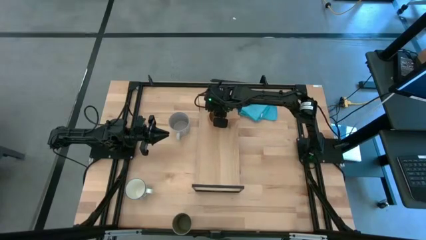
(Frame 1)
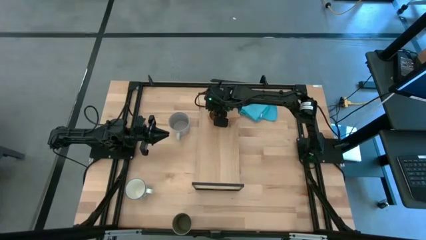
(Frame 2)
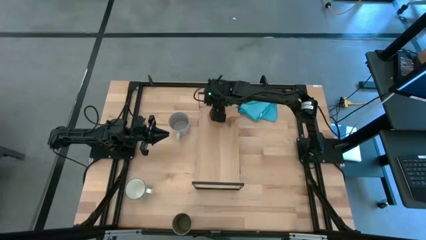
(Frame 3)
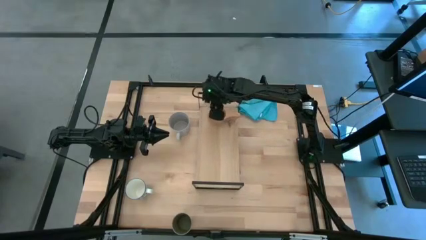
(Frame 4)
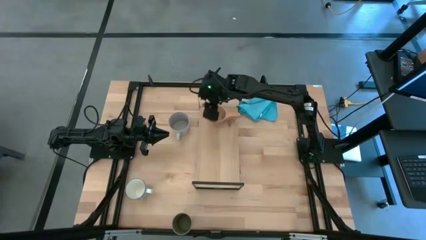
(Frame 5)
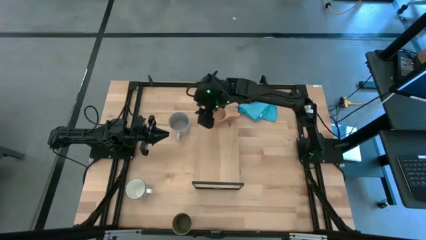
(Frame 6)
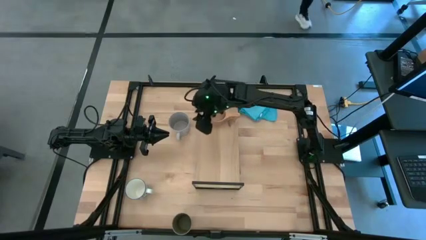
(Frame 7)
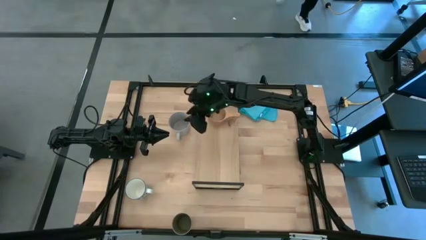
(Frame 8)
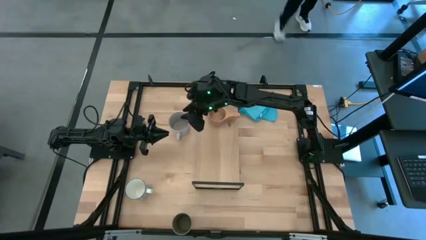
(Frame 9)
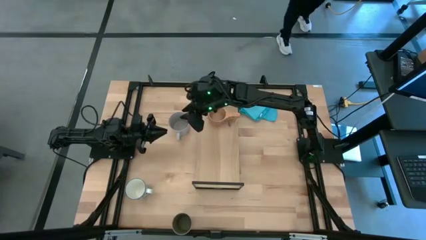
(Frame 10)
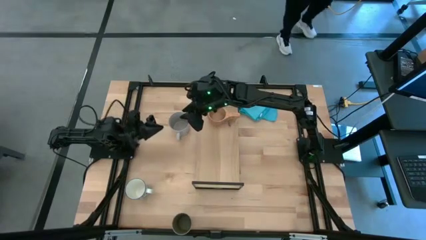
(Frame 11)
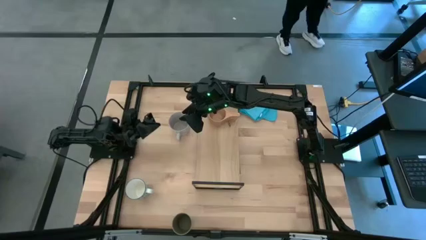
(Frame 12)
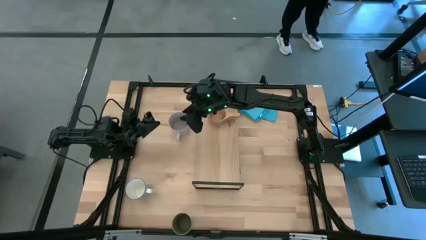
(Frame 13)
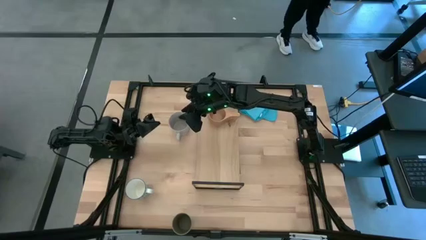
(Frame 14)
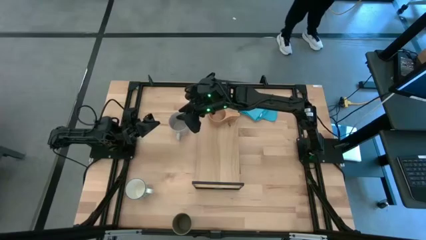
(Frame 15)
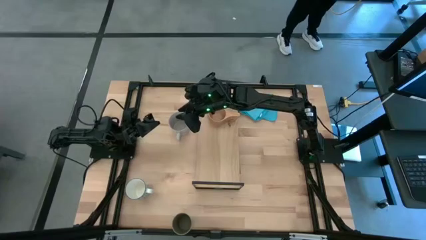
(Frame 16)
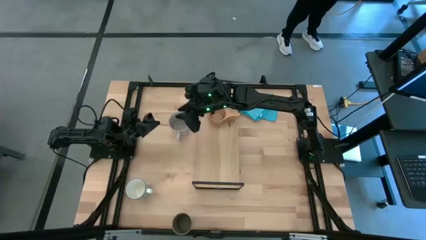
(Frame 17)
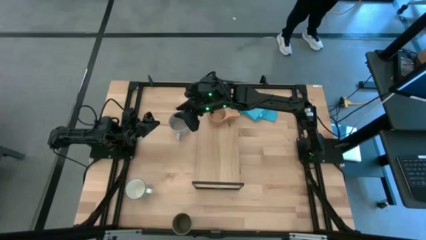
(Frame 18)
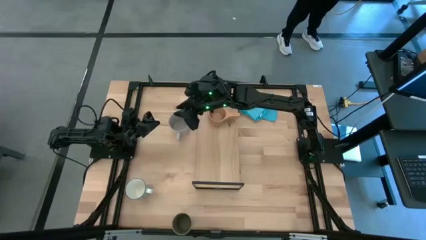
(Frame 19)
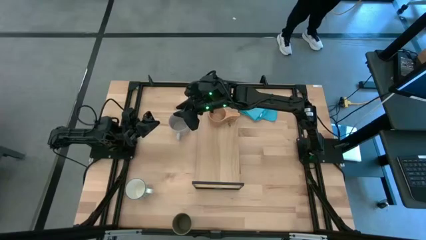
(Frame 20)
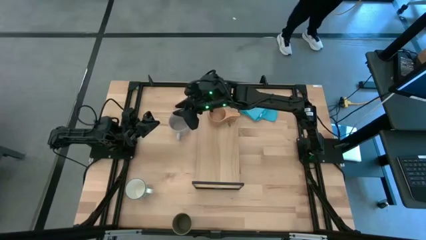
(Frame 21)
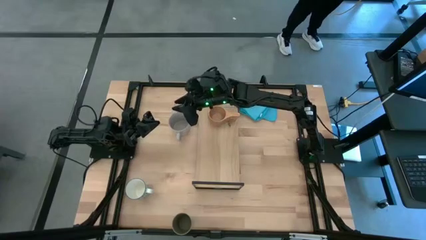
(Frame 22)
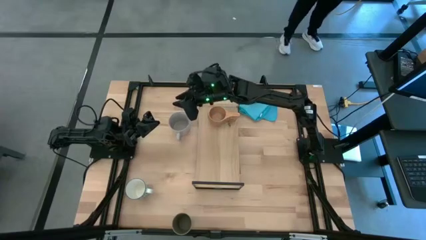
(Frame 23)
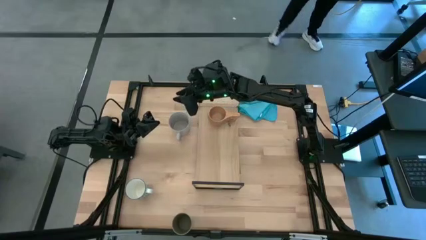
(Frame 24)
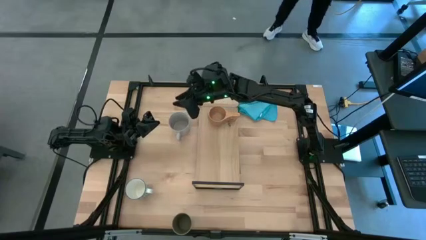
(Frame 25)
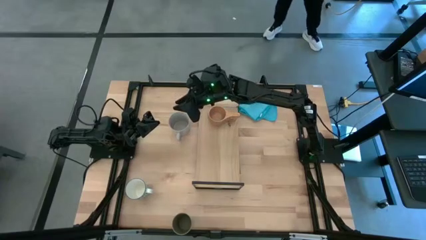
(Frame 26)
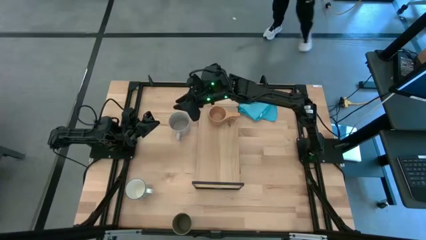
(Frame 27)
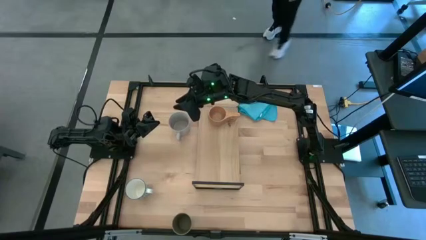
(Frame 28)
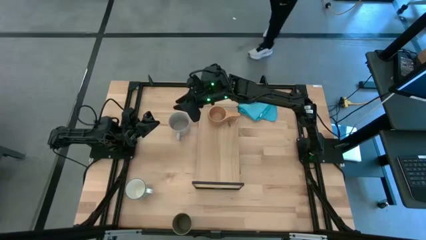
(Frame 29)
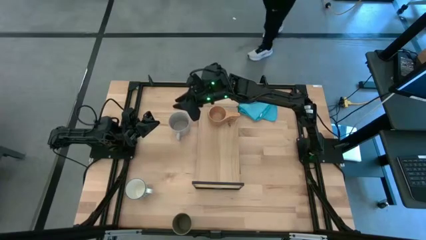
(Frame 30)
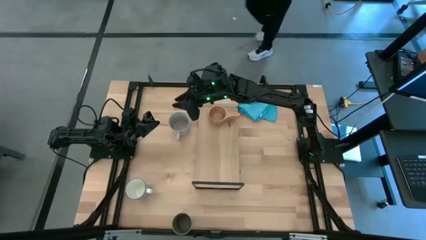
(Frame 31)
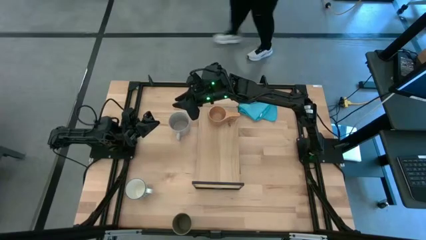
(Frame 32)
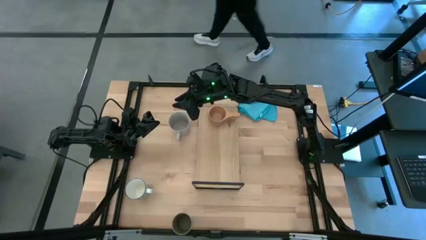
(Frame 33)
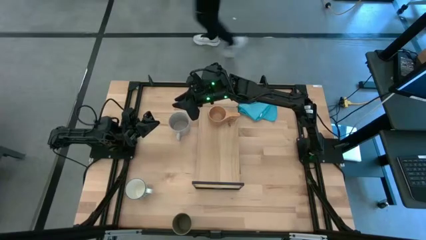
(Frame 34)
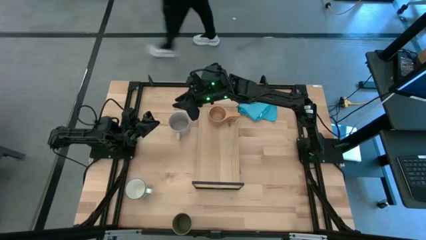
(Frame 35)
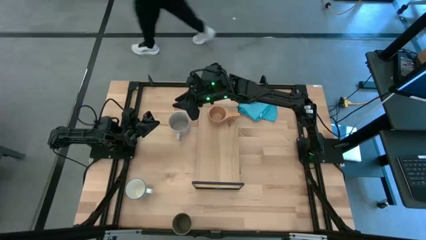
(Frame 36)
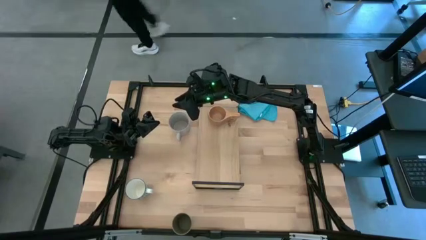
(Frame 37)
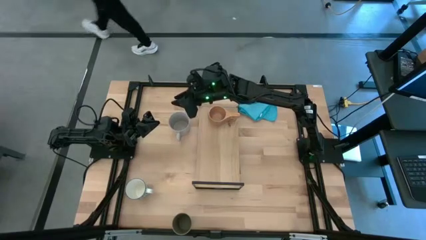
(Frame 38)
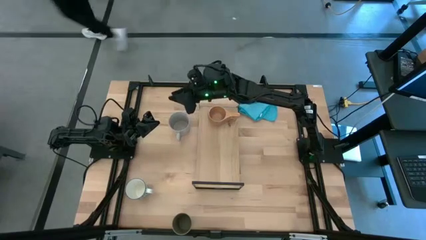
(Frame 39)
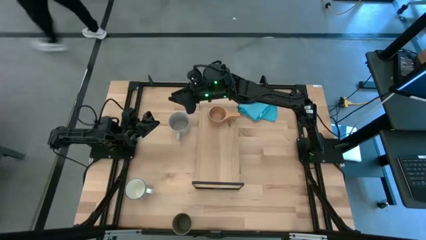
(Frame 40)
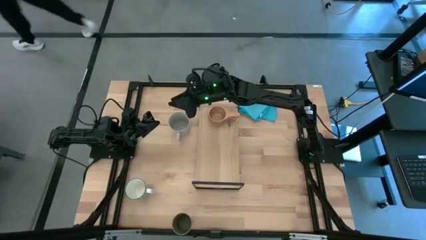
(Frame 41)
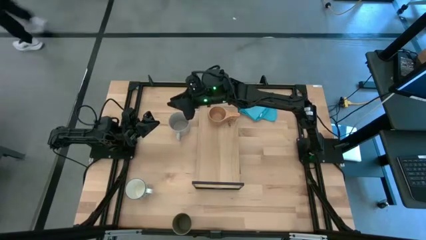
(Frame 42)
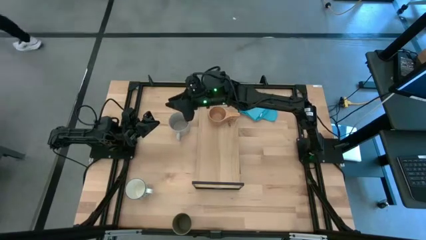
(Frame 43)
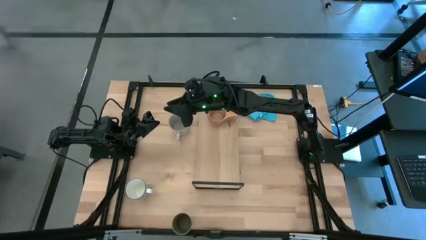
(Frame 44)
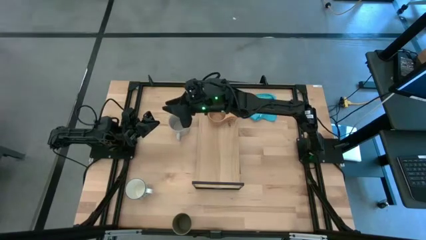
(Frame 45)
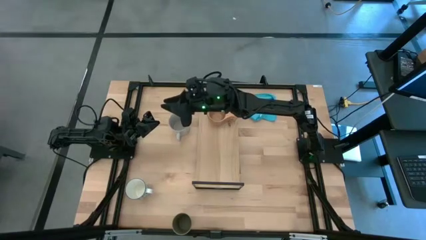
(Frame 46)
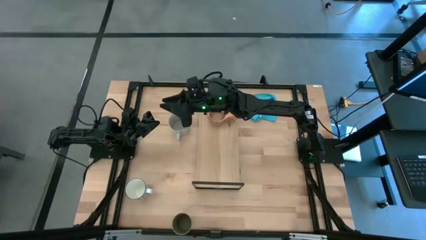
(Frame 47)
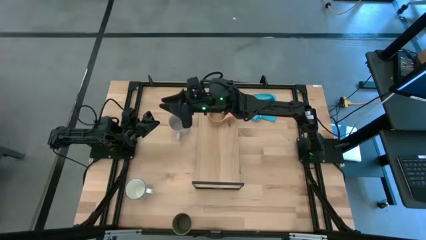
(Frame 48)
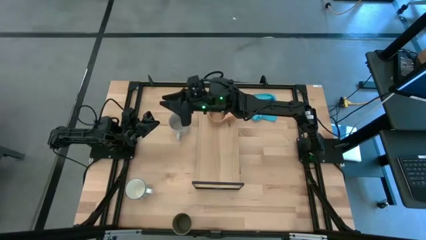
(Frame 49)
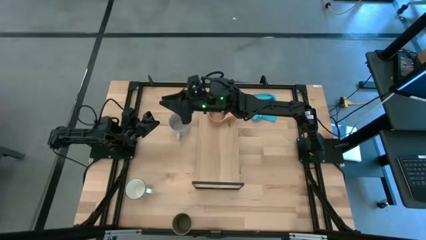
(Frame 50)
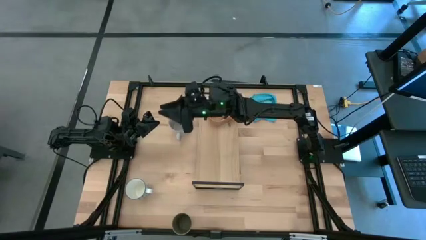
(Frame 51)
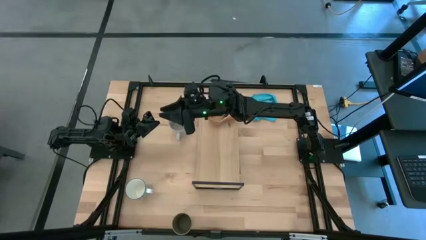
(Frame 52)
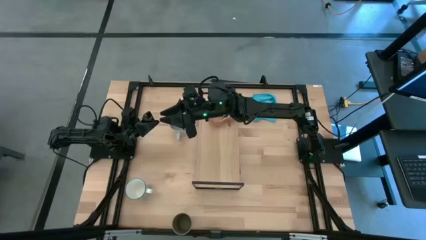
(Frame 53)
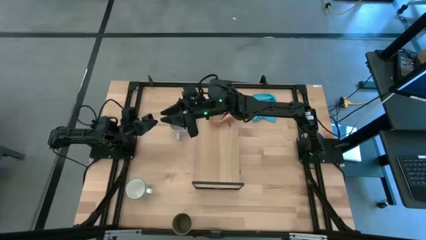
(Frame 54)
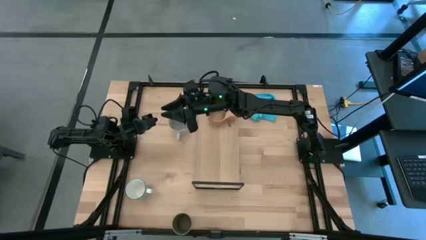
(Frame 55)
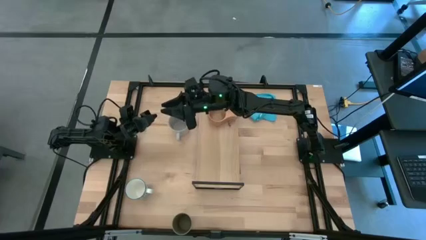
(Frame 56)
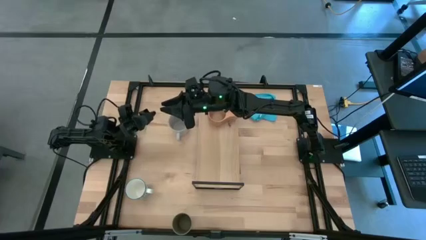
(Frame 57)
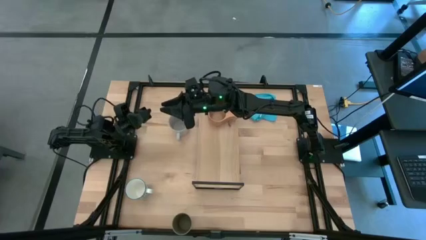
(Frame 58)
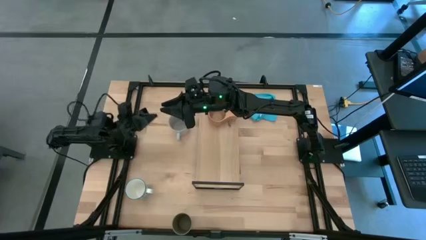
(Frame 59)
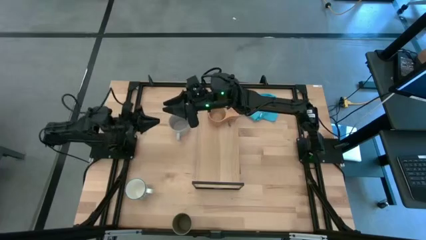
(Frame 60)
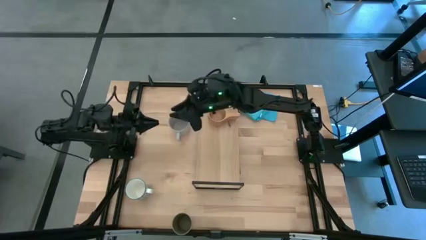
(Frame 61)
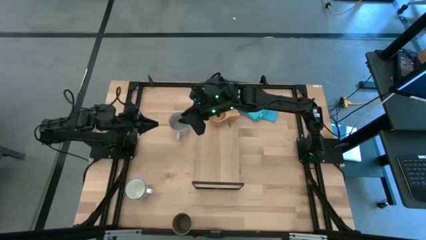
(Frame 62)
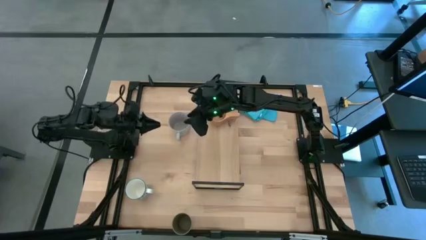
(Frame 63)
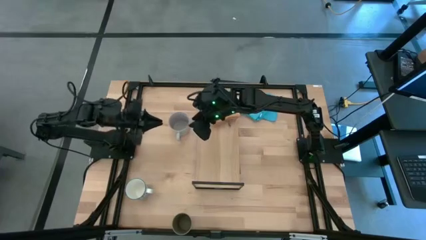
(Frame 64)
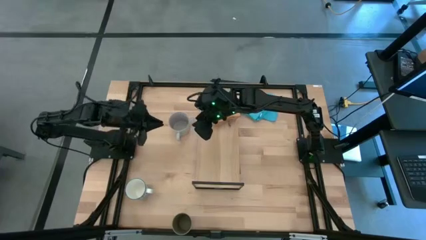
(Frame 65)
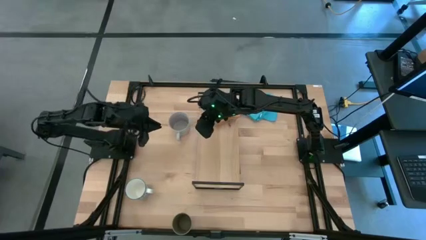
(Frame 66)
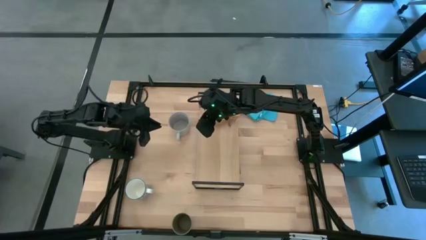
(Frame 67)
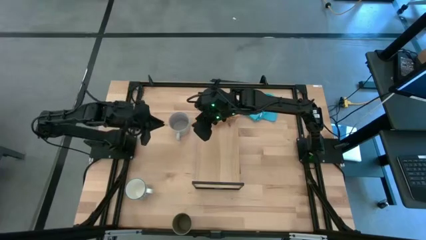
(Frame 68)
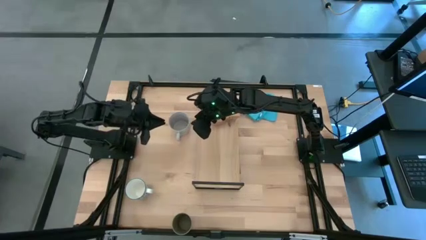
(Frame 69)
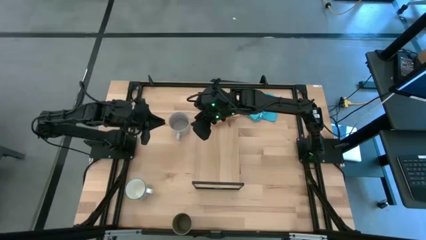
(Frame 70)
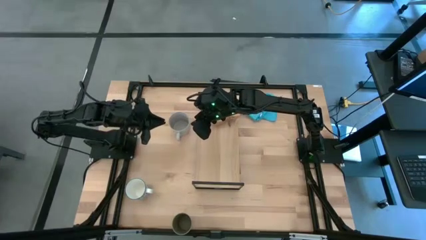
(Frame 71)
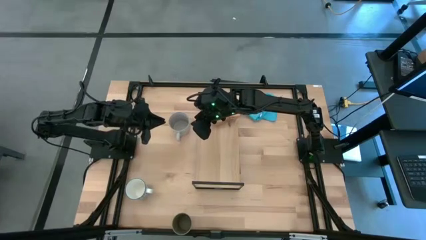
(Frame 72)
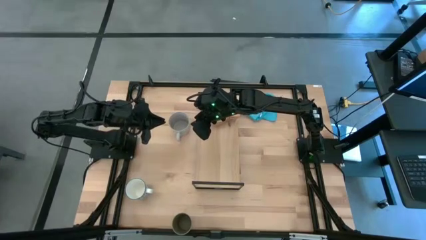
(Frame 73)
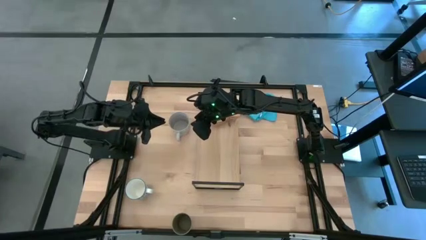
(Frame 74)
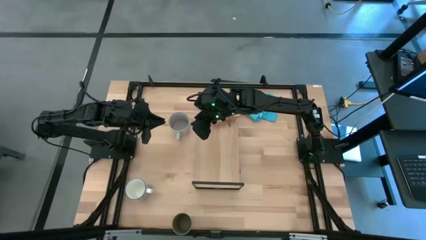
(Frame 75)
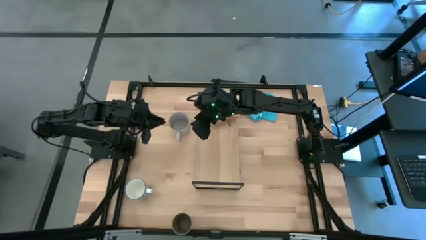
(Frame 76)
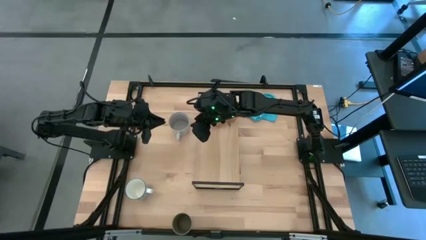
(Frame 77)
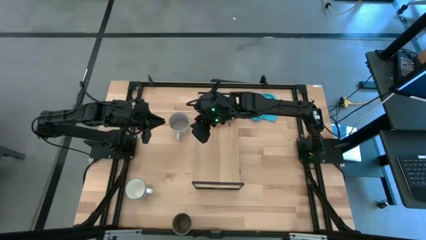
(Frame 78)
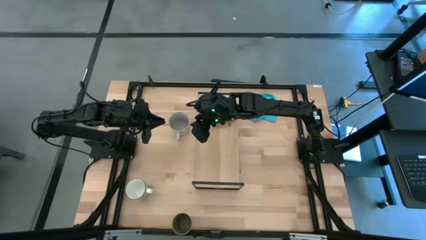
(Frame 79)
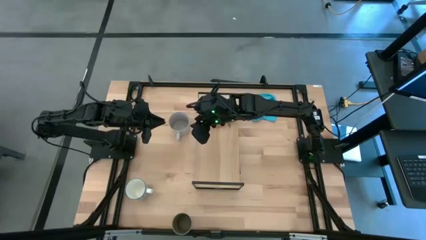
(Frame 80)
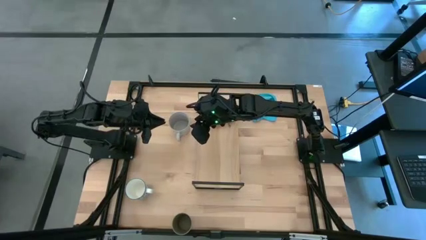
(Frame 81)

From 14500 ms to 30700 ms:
Task: Stack small to large cups/mugs on shelf
Put the gray mug on the shelf
